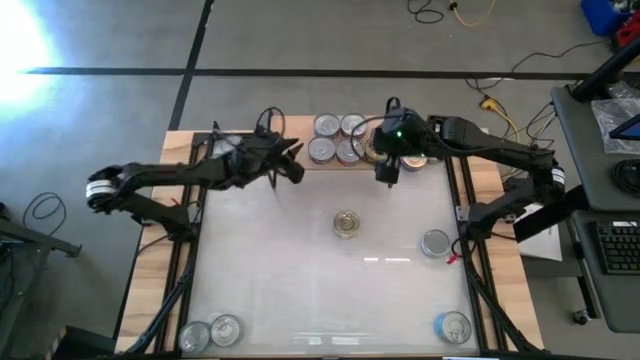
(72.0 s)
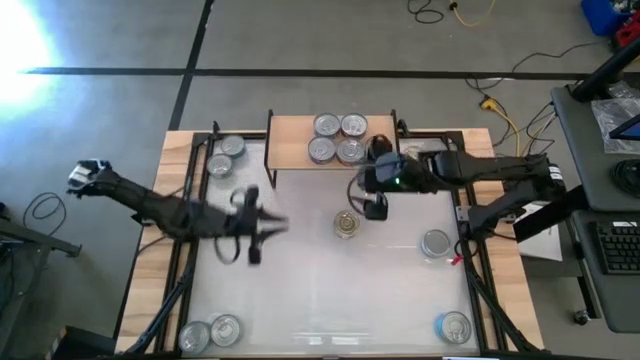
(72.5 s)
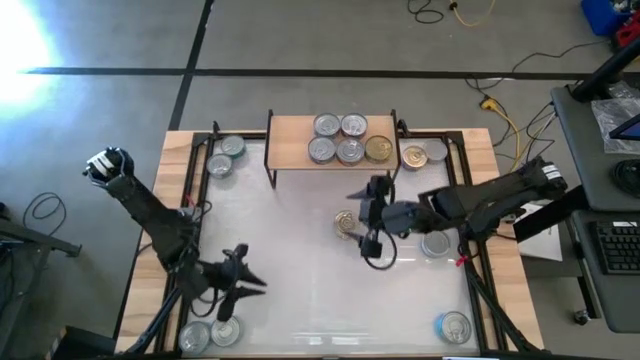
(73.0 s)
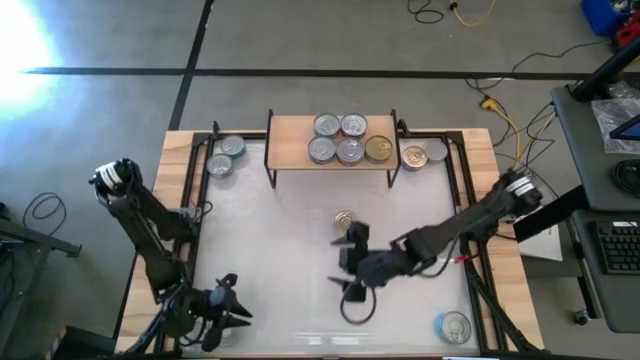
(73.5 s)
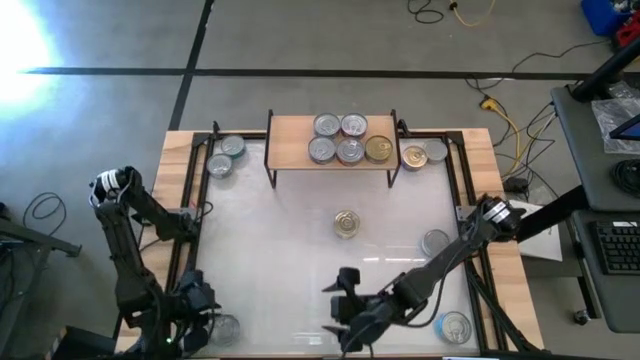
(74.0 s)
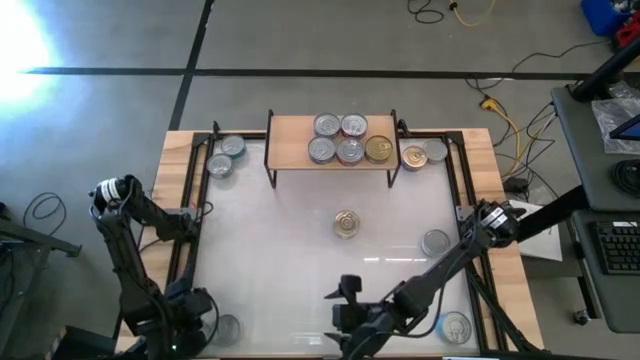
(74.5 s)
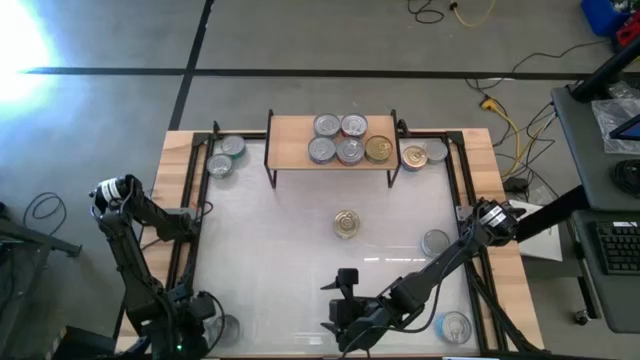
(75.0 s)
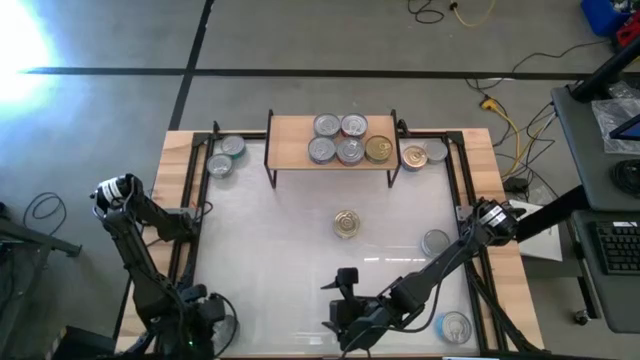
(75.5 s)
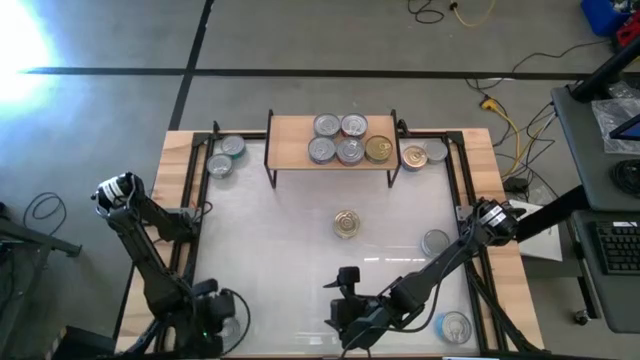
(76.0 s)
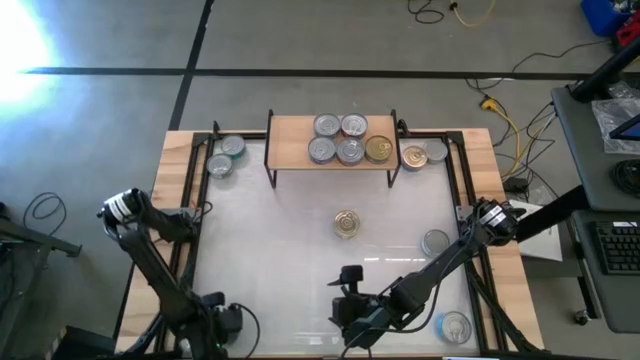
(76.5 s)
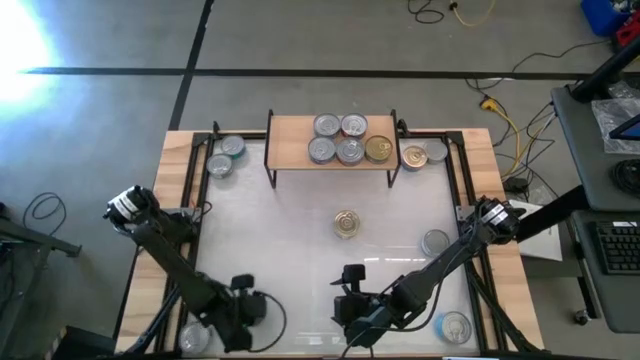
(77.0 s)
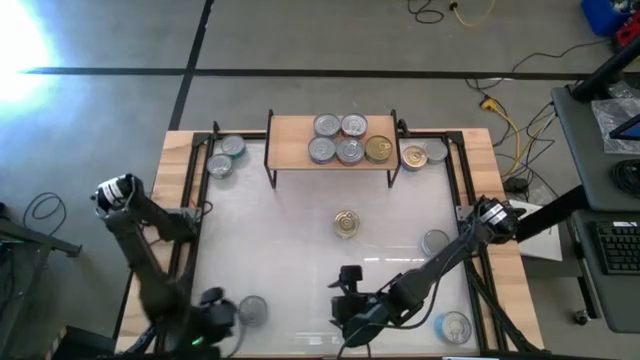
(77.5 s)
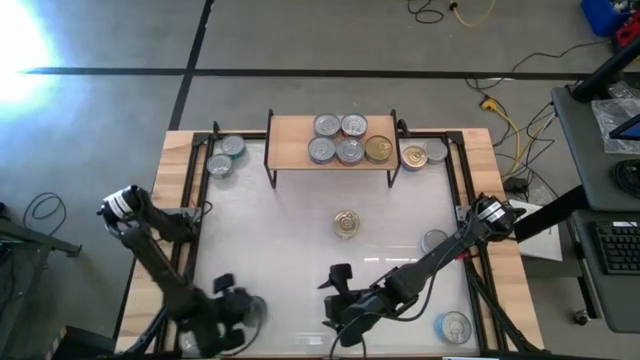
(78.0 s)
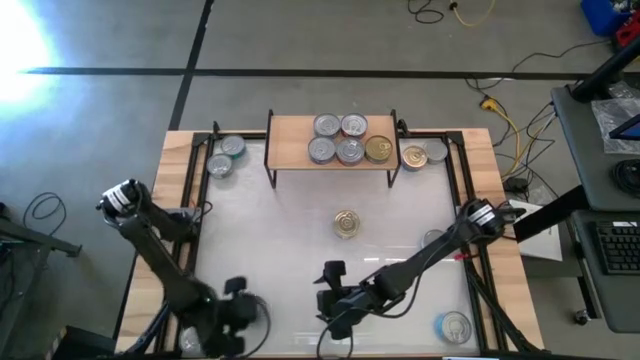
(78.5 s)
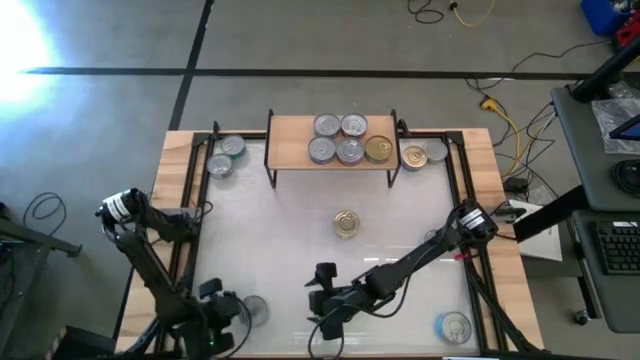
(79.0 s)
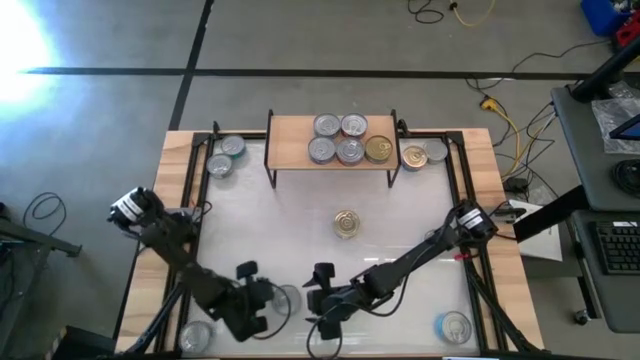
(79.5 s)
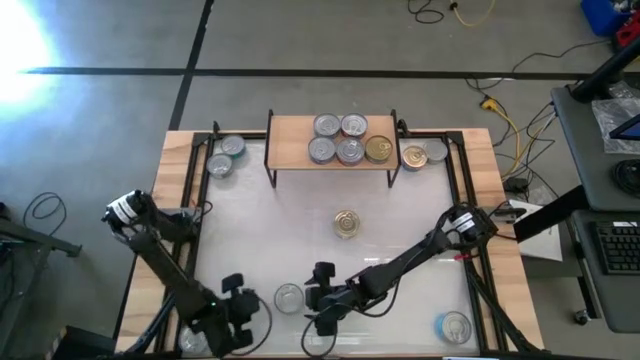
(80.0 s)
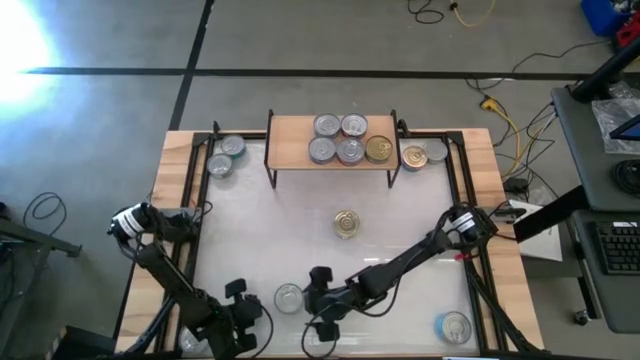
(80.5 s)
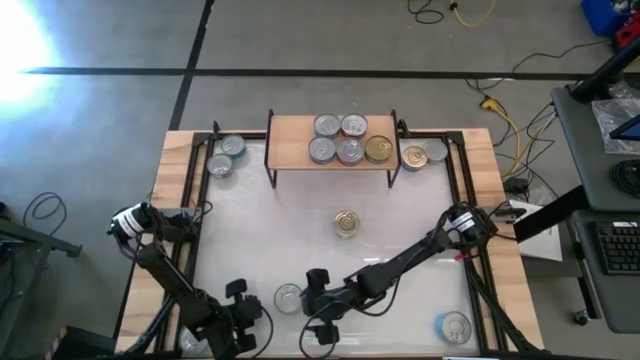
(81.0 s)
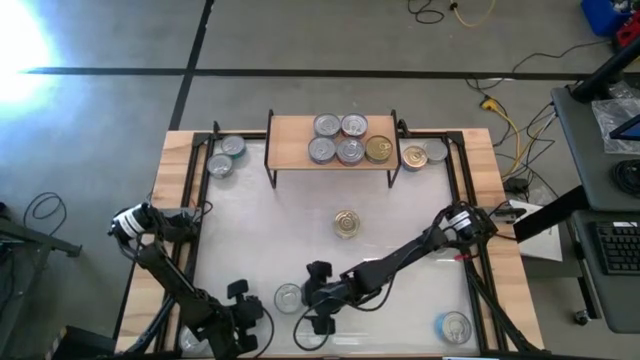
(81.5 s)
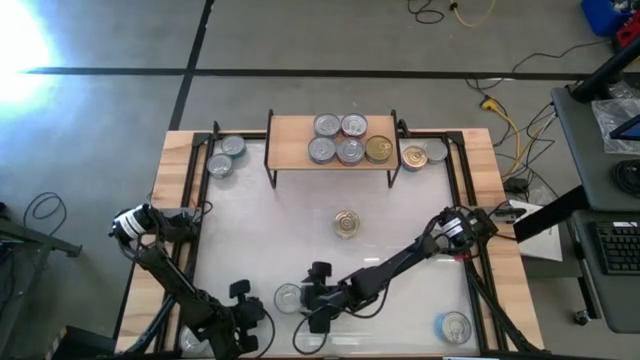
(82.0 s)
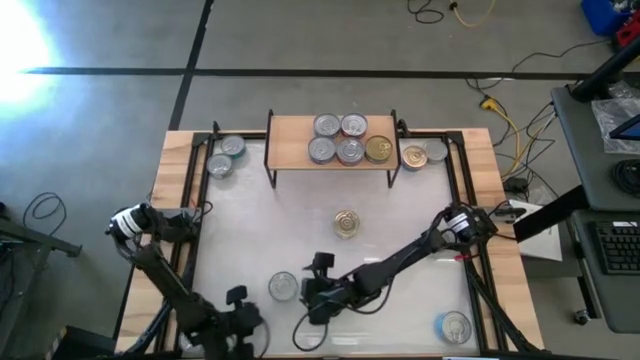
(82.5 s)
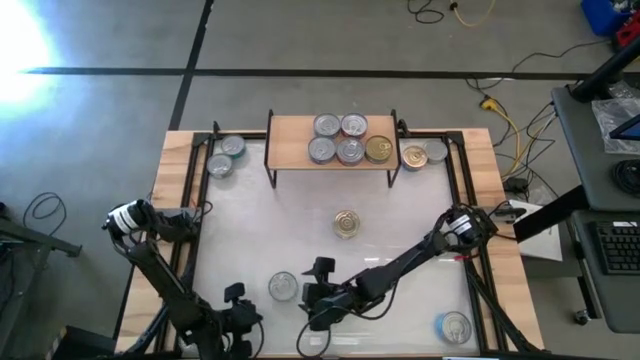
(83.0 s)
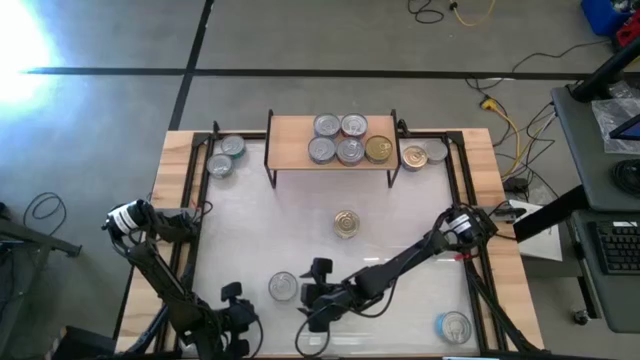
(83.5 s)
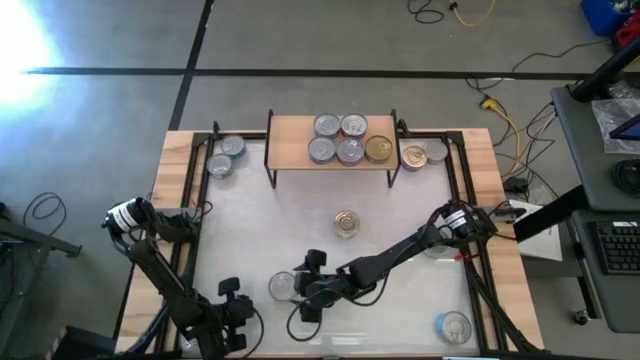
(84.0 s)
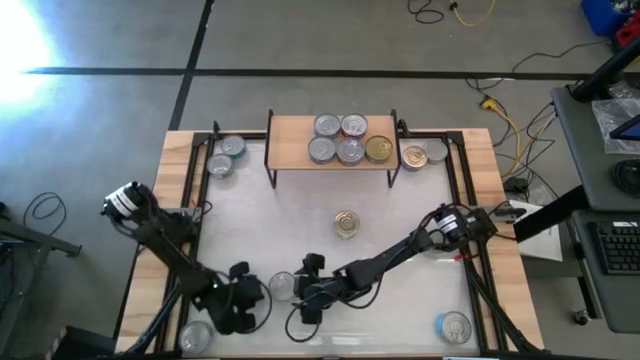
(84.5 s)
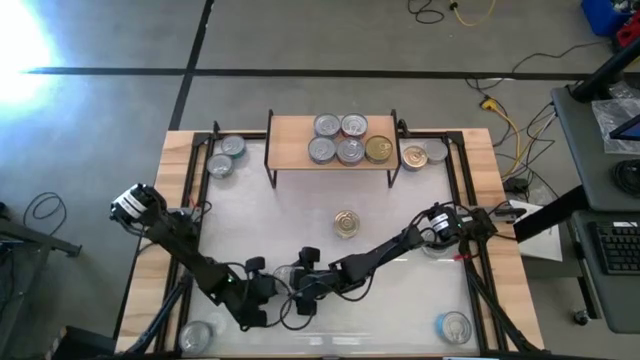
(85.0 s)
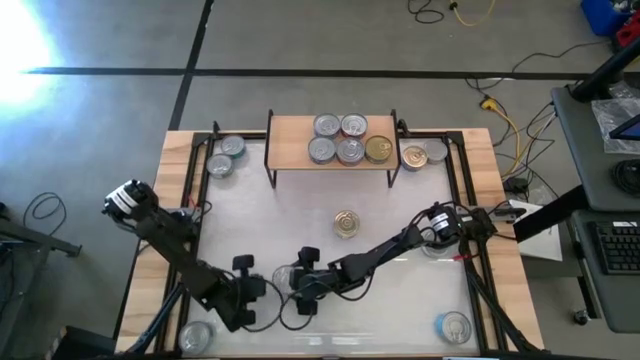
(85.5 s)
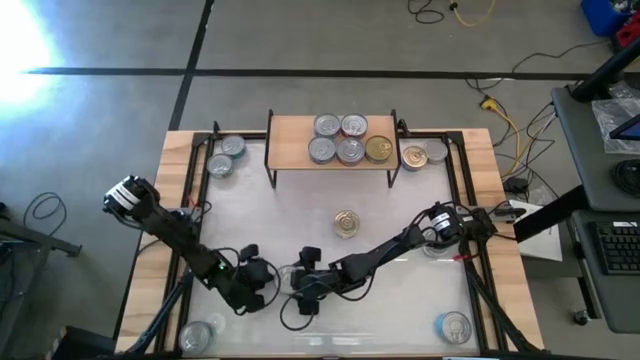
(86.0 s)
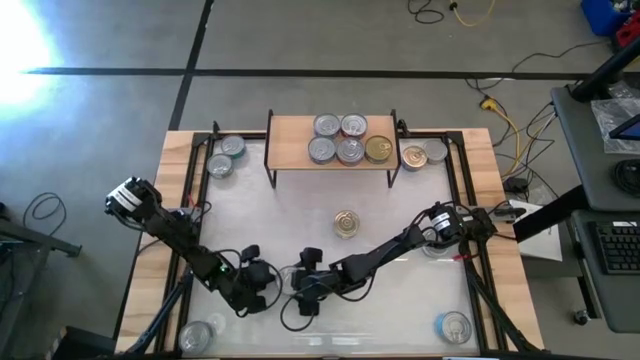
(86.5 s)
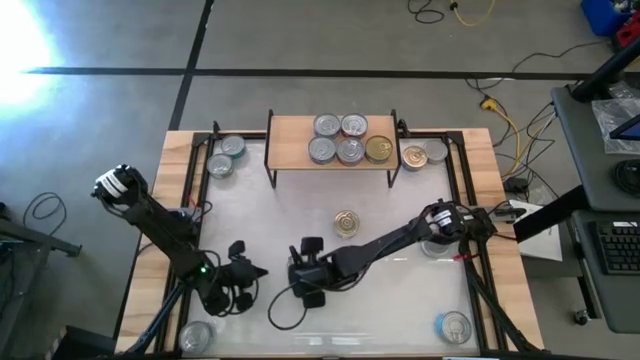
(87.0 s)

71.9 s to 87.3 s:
Task: Stack canned seafood by type on shelf
Put the bottom middle yellow-blue tuna can on the shelf

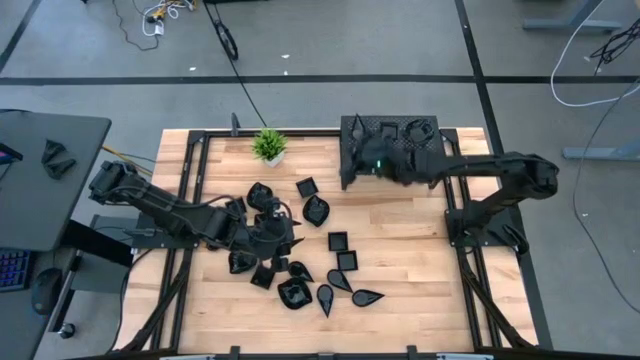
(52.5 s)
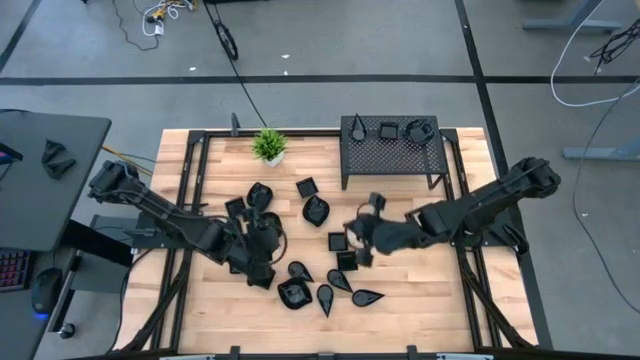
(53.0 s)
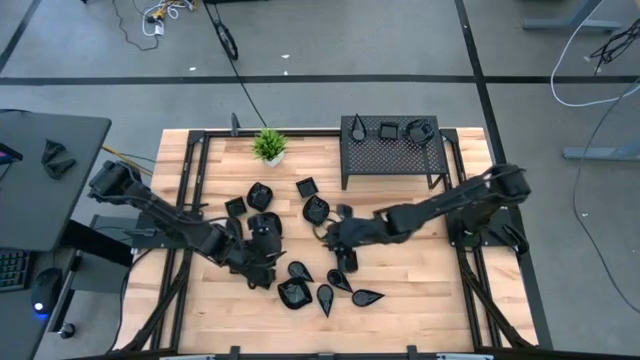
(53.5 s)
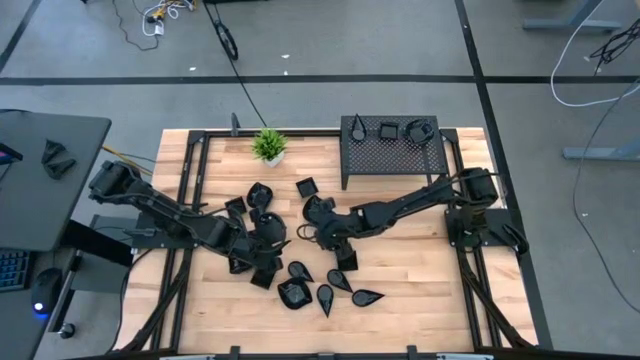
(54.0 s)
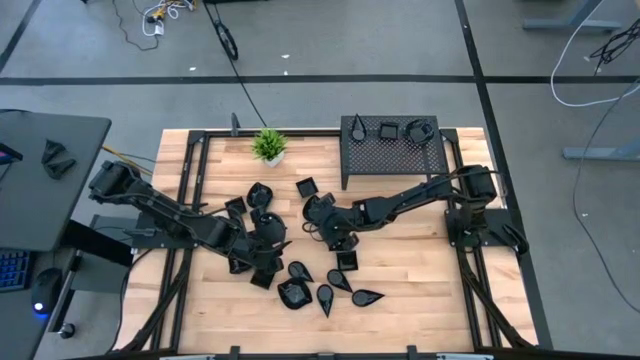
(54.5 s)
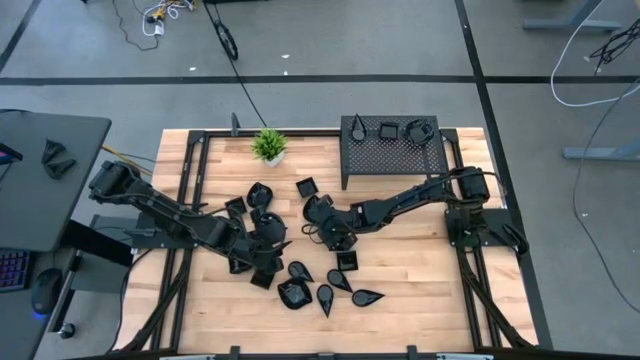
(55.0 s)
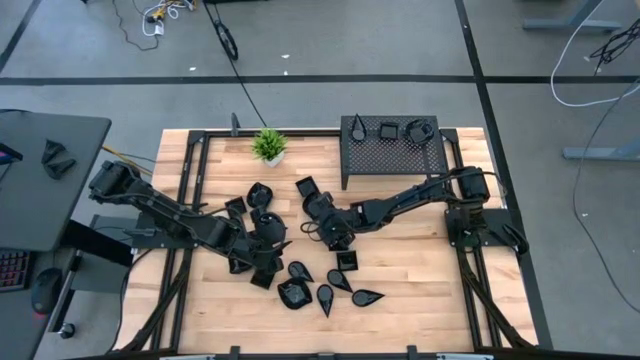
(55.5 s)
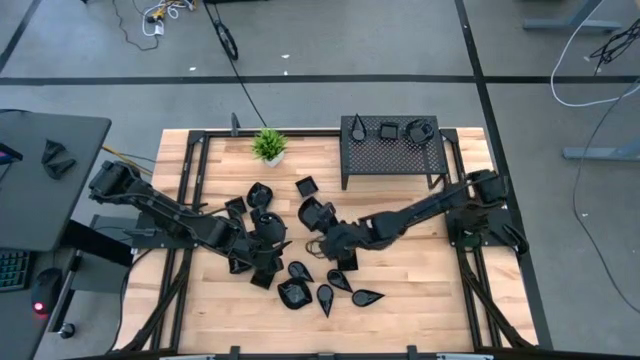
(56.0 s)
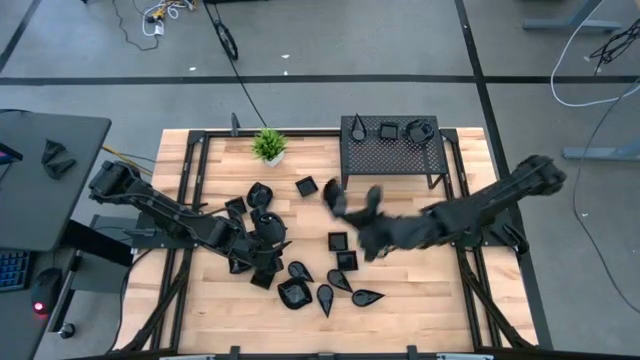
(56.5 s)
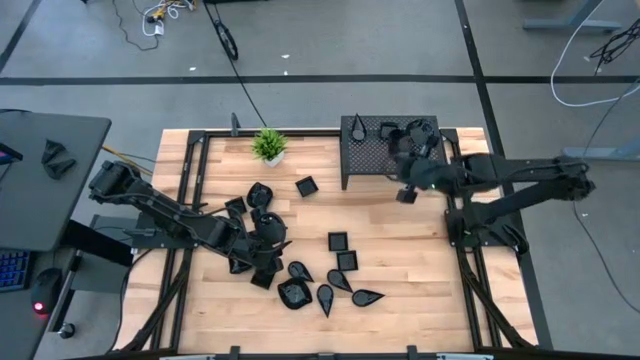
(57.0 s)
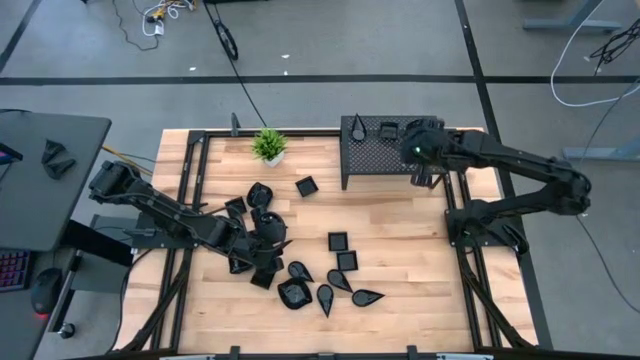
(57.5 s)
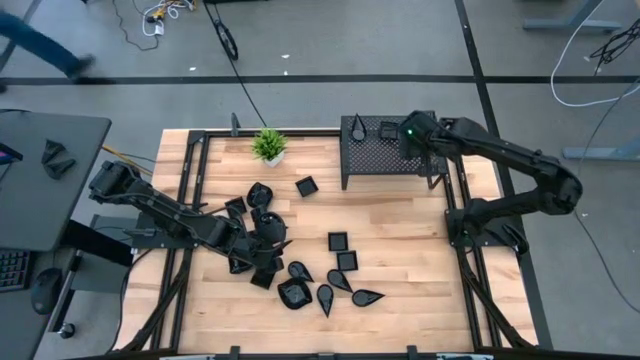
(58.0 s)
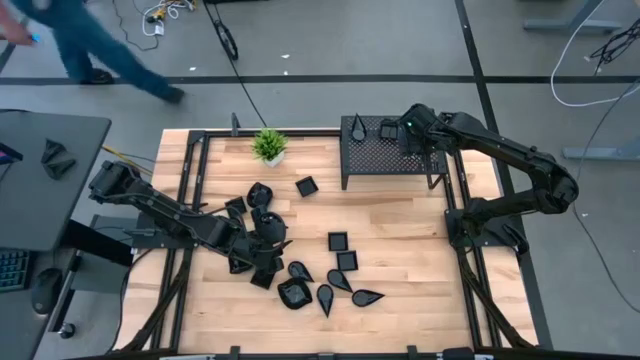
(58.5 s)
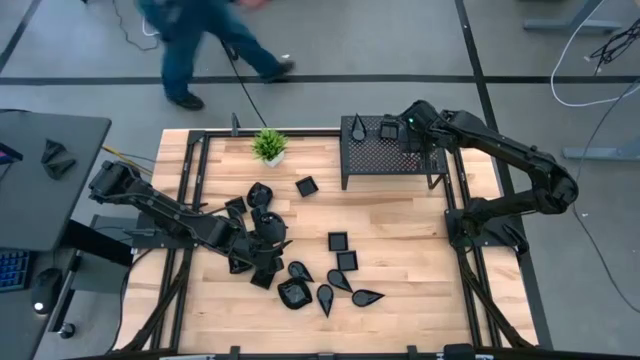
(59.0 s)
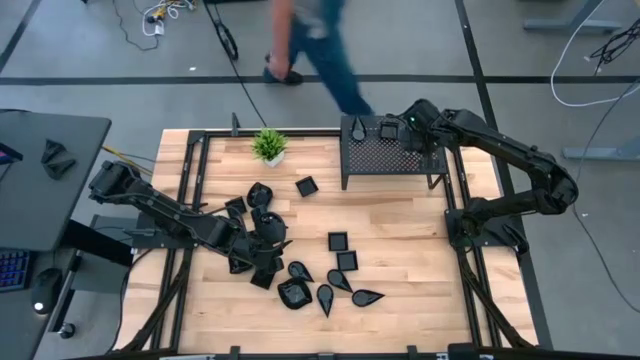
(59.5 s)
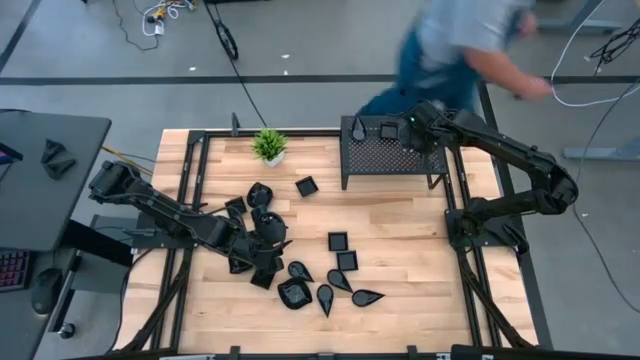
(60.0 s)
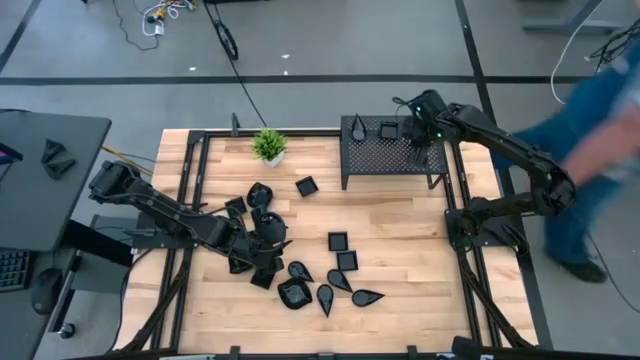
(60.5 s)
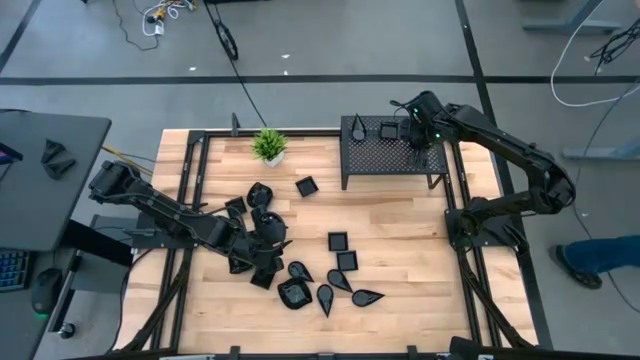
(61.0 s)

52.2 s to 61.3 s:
Task: Pick & Place Mini shaped plates
Stack the black leaf-shaped plate on top of the black leaf-shaped plate on the shelf
